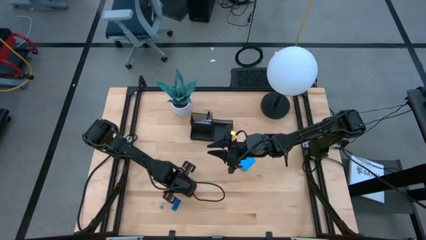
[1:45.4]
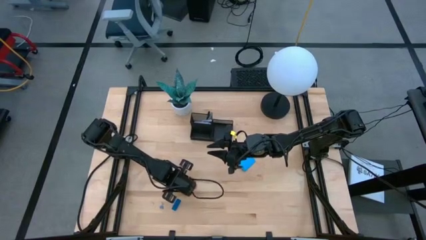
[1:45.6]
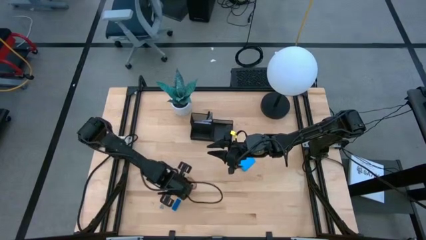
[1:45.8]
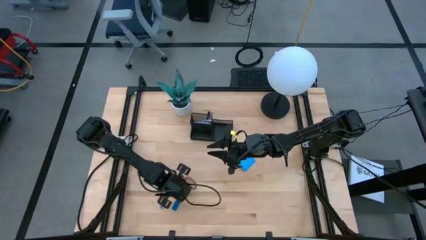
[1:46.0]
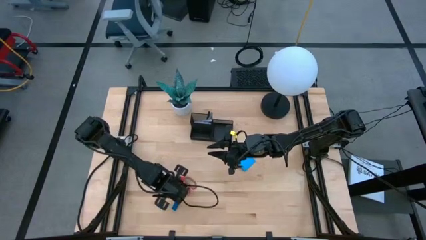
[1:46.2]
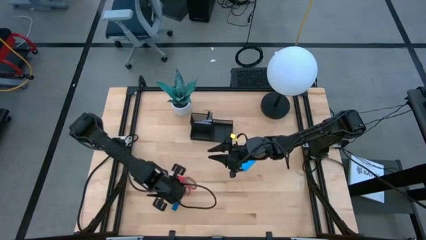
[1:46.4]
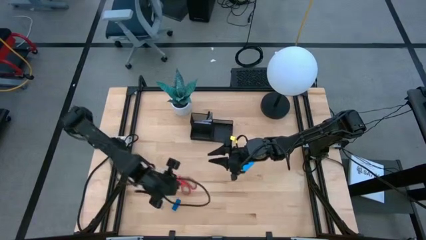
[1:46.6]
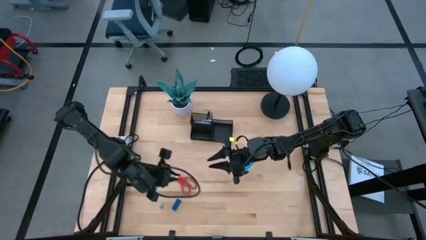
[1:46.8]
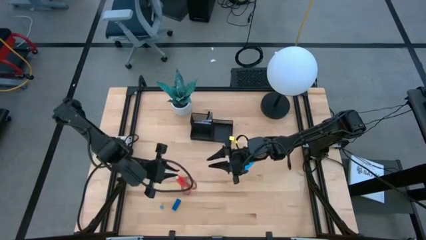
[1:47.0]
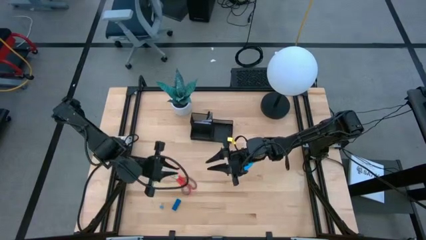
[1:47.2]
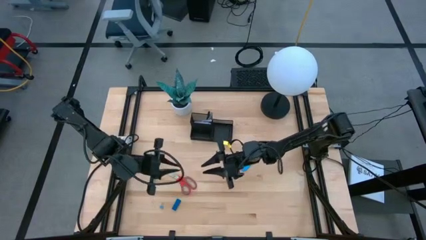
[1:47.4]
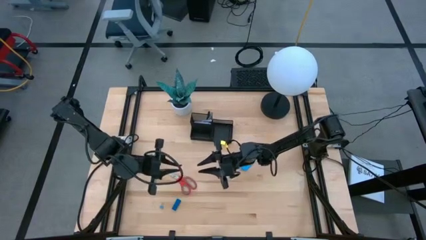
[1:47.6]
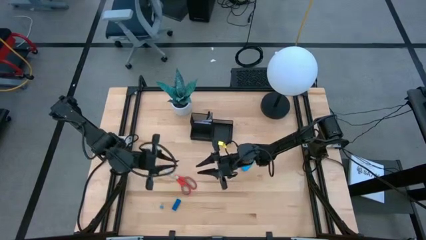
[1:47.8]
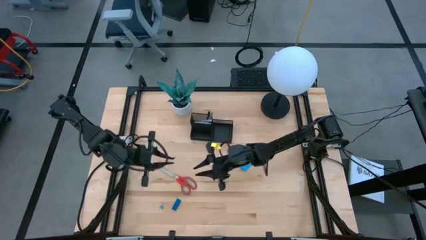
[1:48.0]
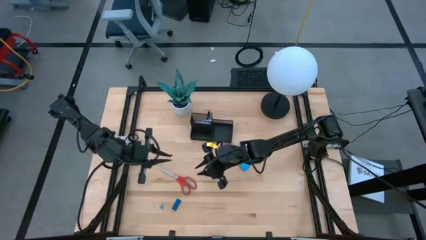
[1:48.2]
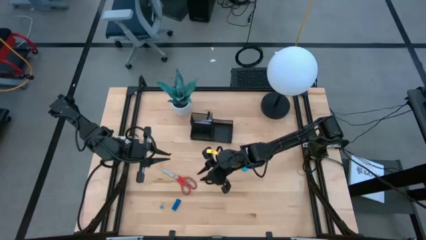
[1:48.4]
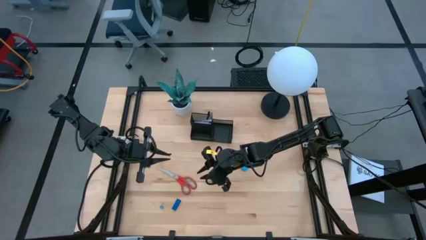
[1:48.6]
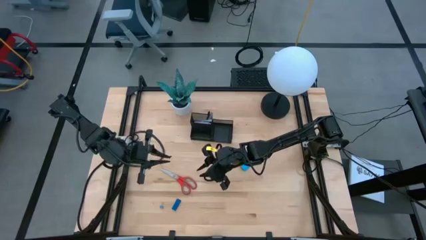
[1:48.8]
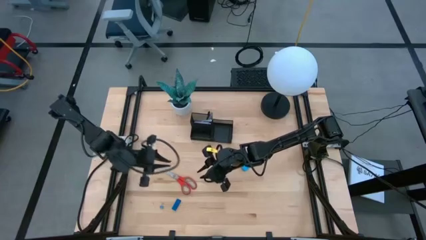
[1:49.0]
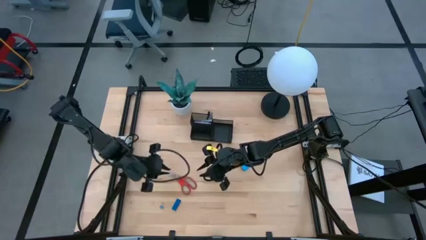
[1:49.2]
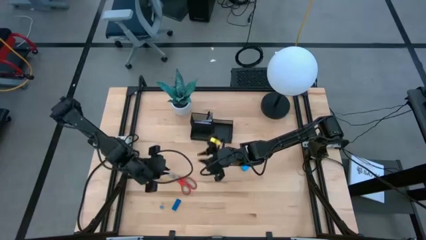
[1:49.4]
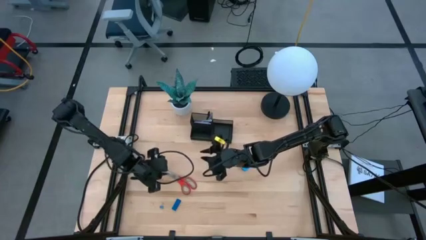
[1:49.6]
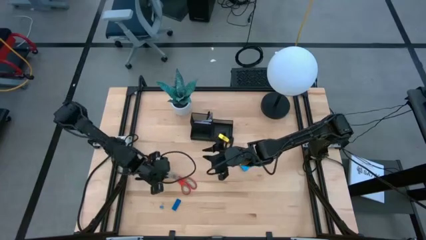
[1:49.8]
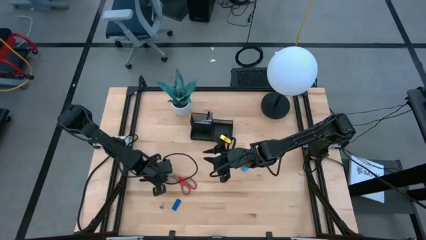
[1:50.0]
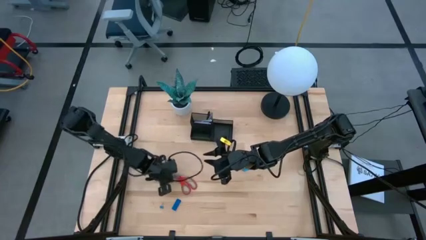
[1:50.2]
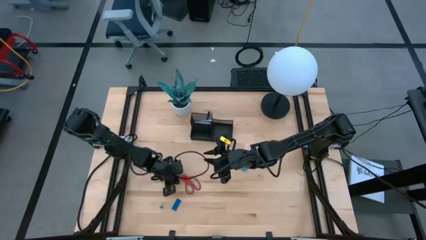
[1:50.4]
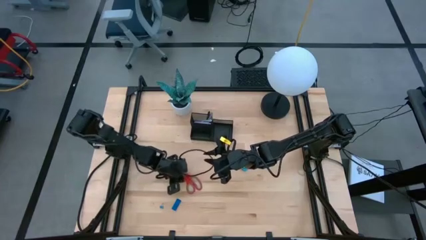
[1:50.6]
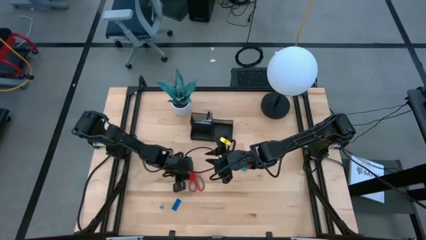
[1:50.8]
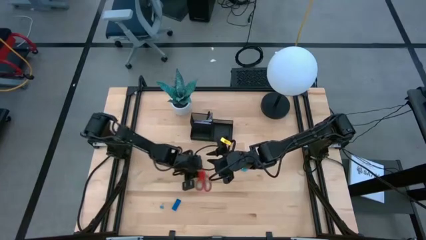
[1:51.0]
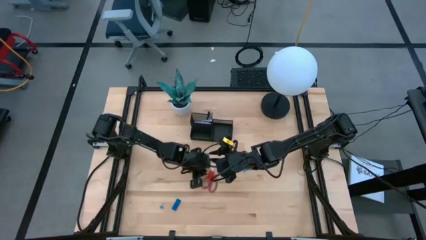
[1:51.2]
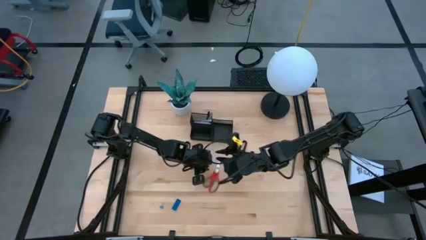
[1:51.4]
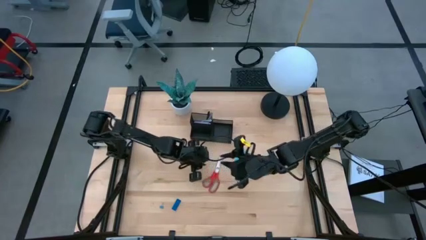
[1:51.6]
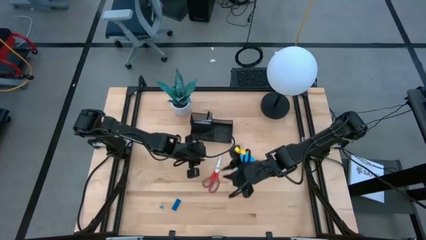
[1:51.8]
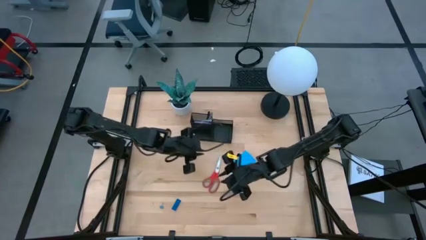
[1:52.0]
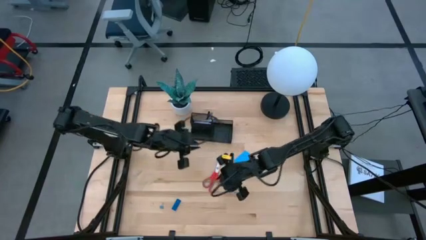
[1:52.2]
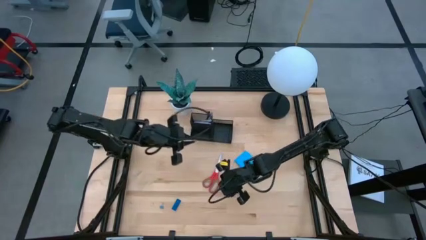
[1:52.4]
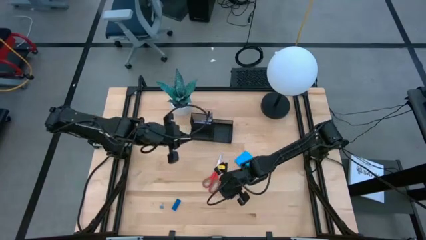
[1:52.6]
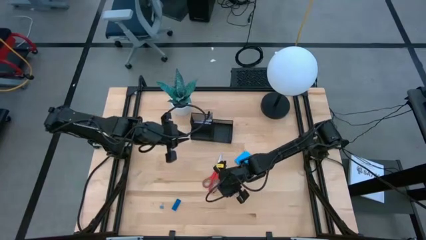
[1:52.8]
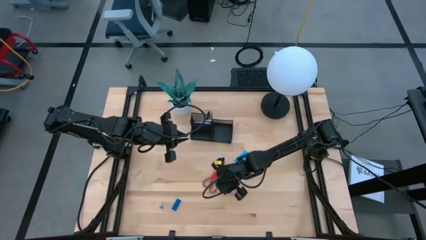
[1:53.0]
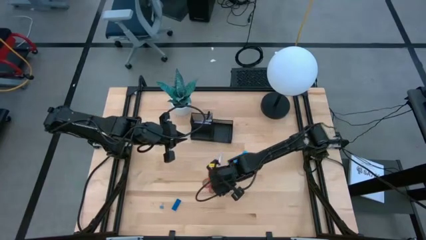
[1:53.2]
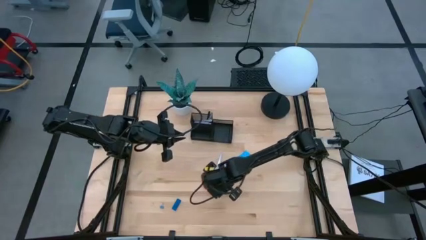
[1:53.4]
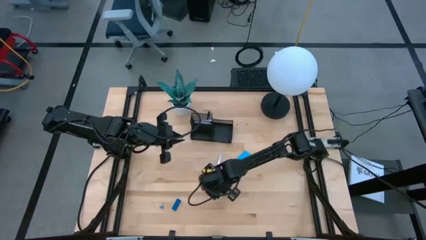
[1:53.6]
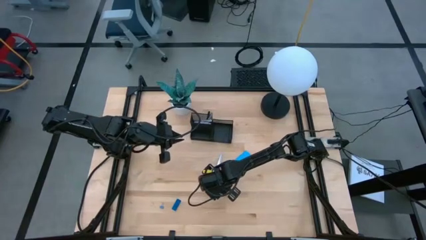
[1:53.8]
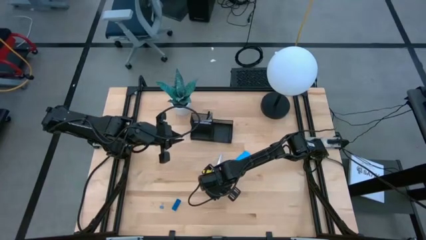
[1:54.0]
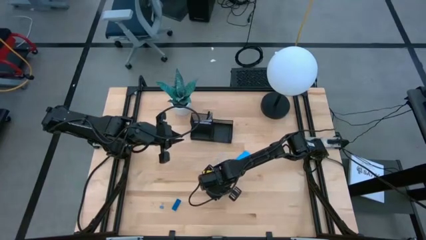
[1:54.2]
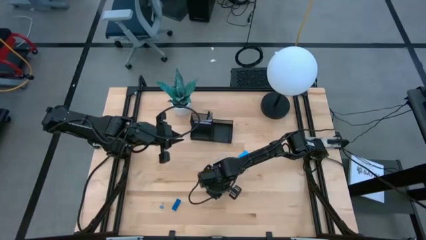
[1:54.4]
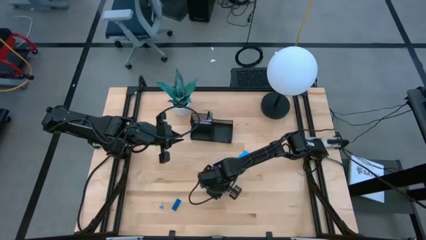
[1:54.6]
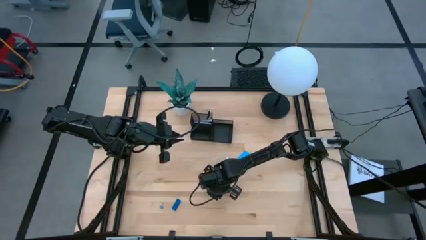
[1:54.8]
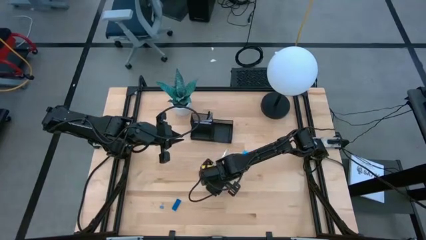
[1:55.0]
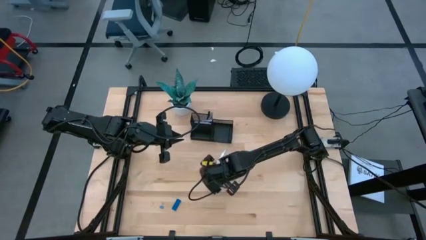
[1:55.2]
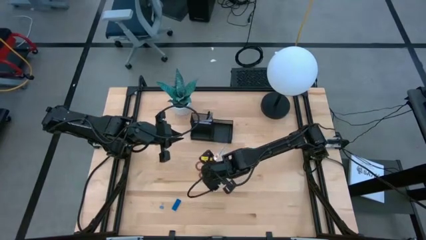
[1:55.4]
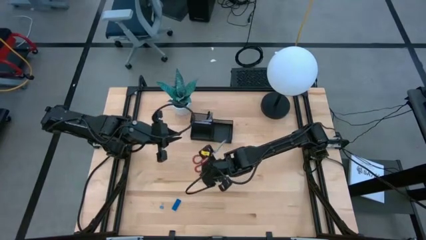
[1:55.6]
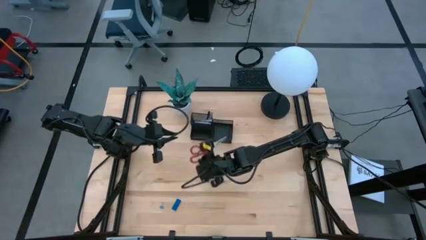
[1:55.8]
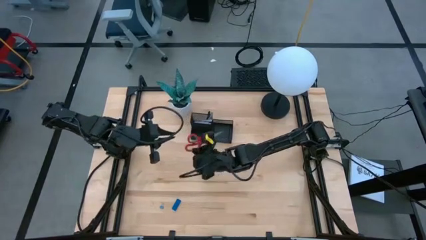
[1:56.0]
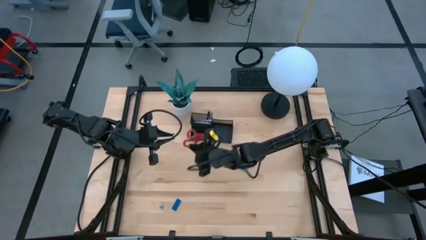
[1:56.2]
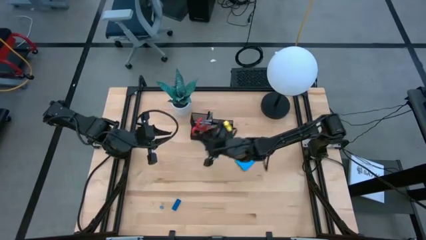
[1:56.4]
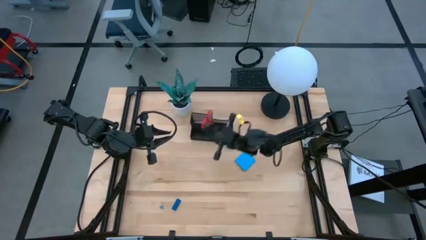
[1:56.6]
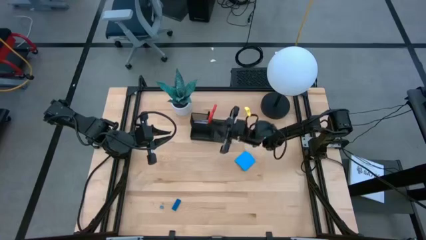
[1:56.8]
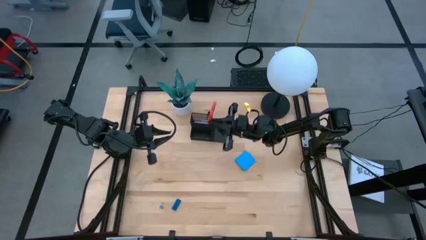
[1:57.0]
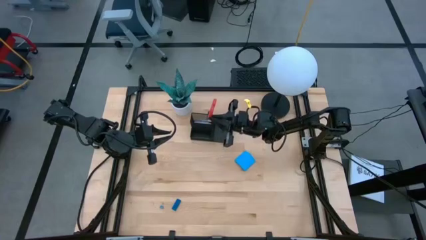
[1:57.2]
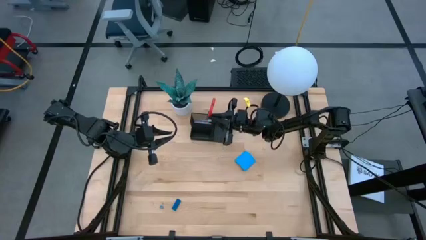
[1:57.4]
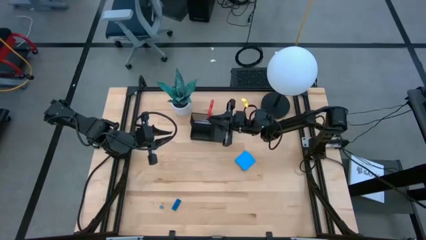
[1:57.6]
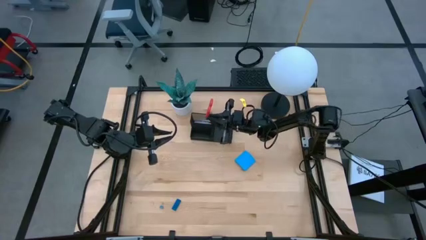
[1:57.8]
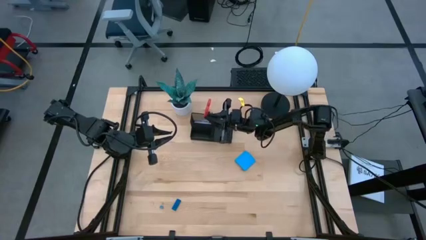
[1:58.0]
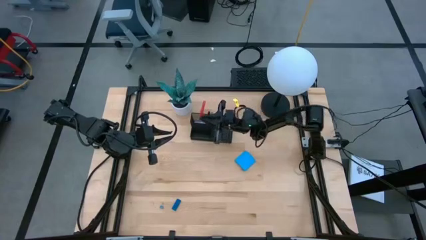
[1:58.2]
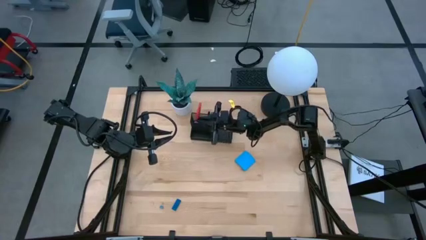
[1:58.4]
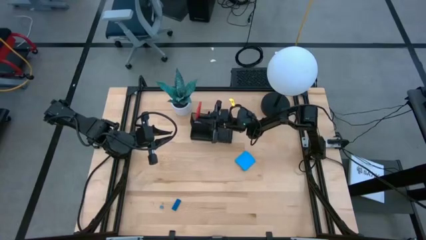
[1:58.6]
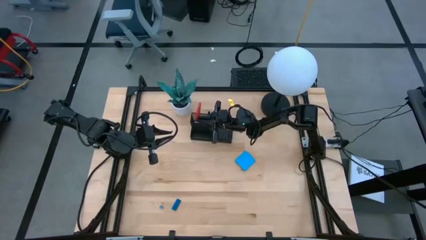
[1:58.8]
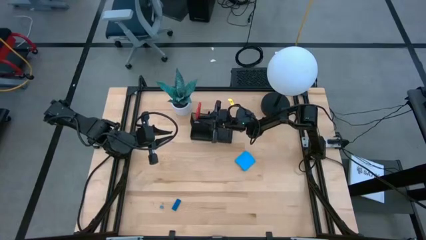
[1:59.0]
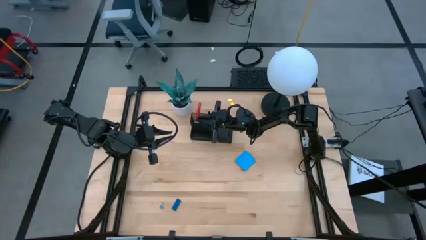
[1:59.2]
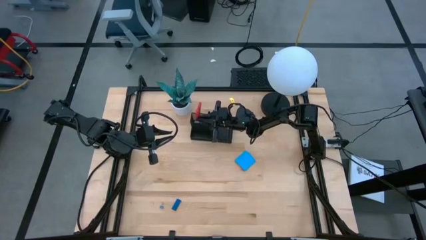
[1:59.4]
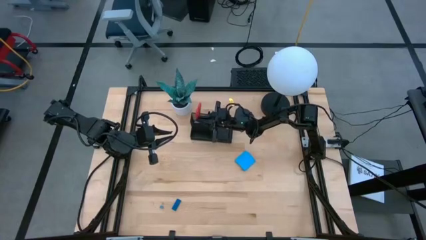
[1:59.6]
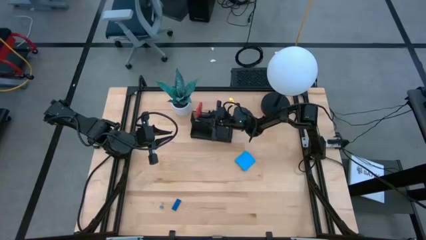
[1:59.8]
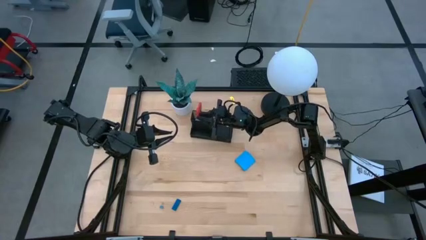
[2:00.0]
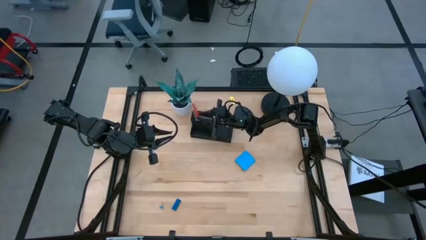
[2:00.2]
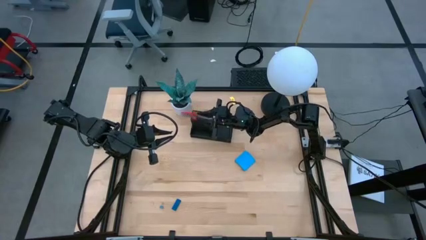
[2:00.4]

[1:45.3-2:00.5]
Task: Pick and place office supplies into organizer
Put the red scissor into the black desk organizer

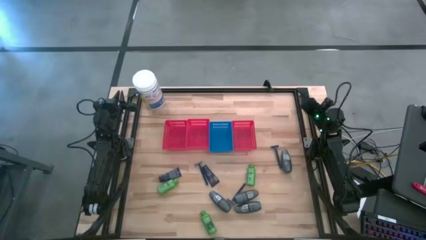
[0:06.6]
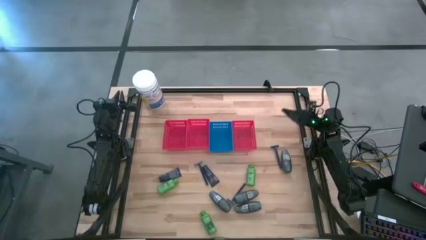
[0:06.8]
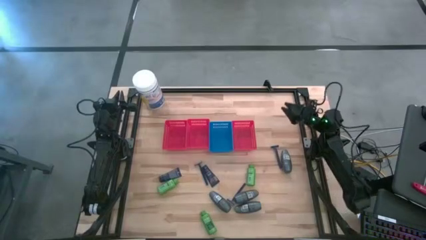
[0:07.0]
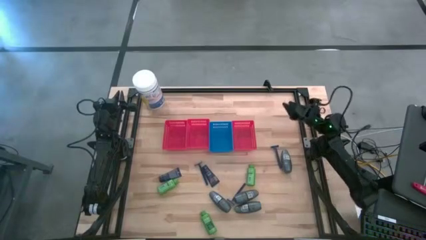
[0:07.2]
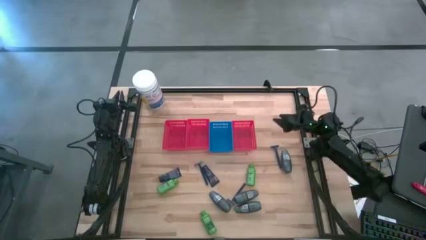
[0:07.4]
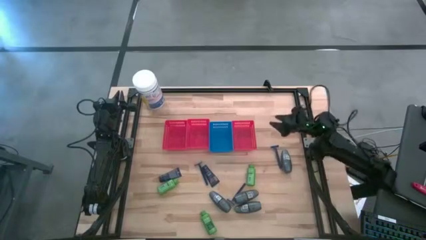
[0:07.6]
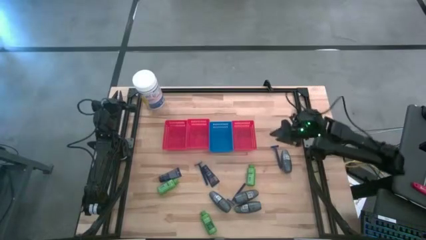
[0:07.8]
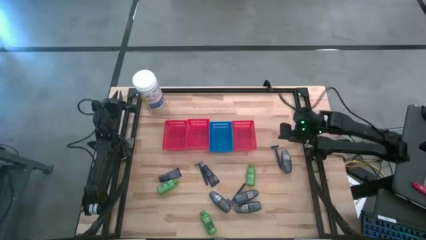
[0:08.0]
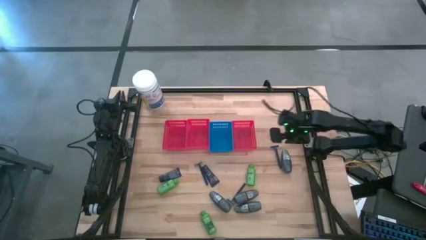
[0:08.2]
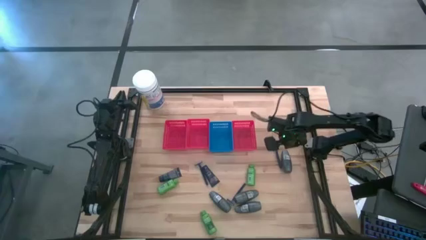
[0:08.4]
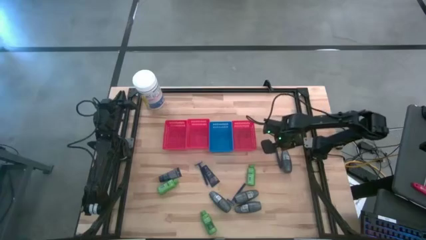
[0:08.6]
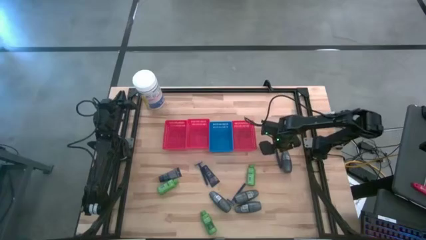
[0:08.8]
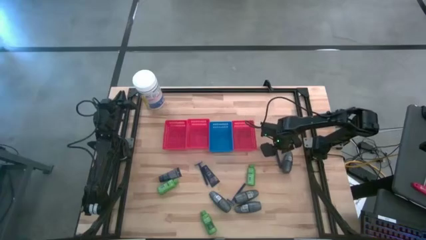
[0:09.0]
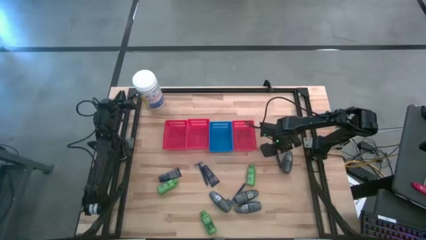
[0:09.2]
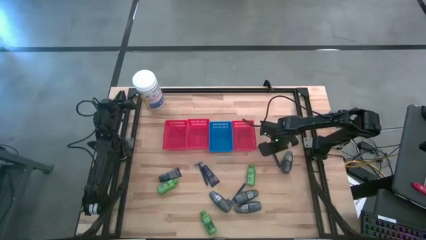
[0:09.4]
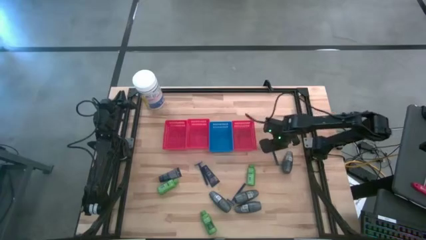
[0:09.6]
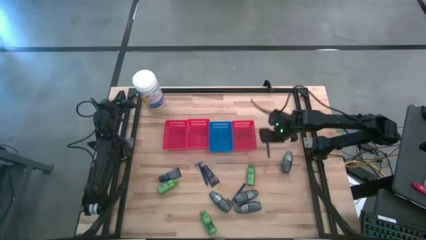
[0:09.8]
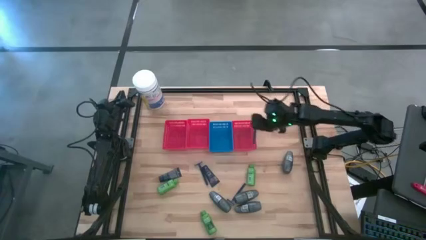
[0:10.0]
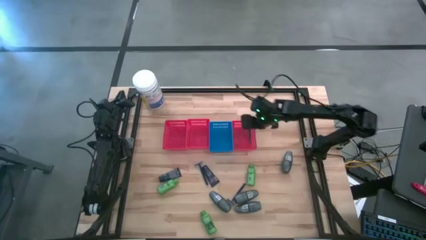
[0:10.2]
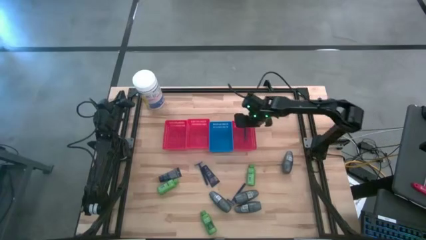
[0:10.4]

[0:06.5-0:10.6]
Task: Pick & Place Travel size toiletries
Put the blue razor into the right red bin
